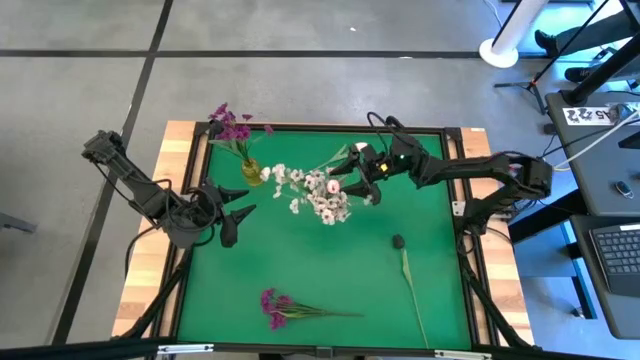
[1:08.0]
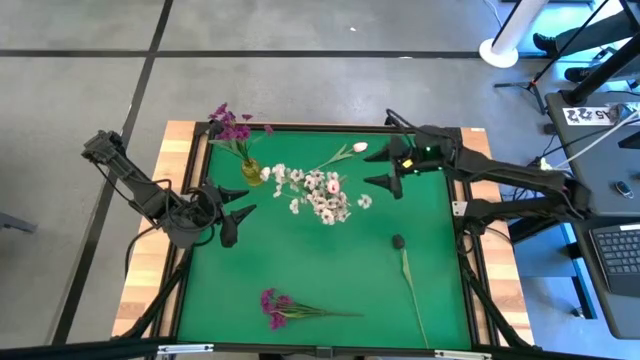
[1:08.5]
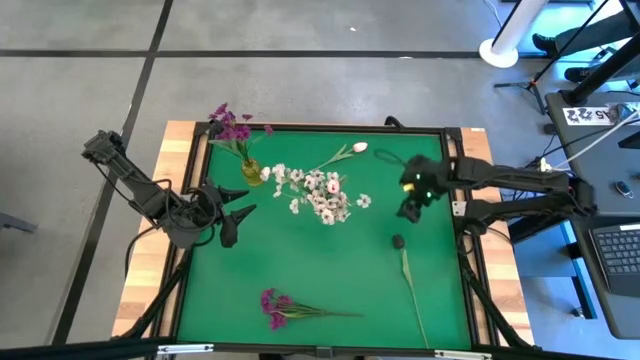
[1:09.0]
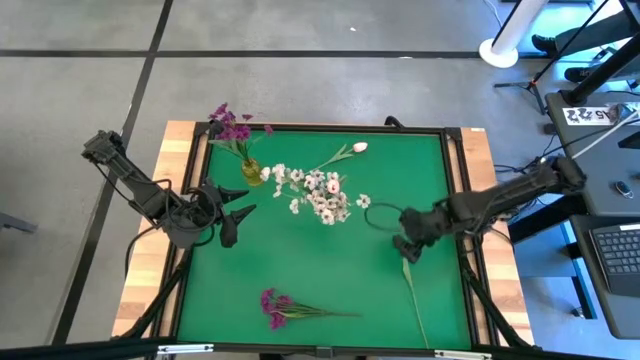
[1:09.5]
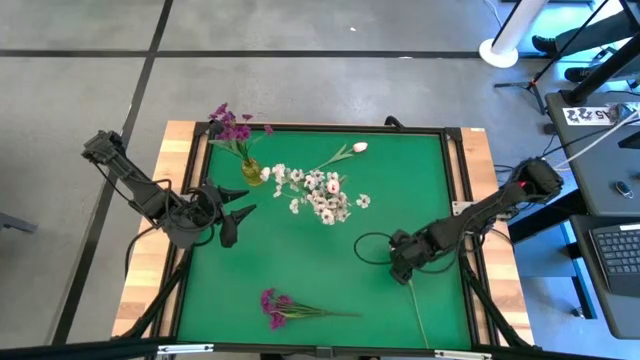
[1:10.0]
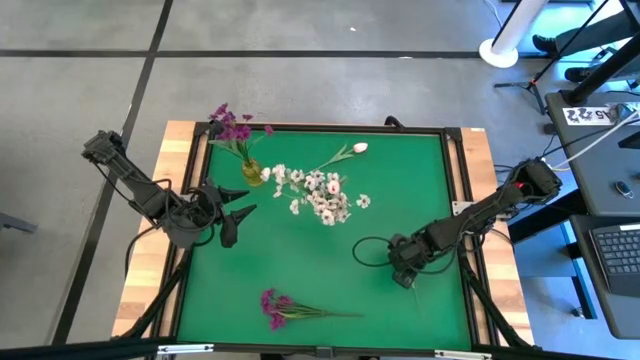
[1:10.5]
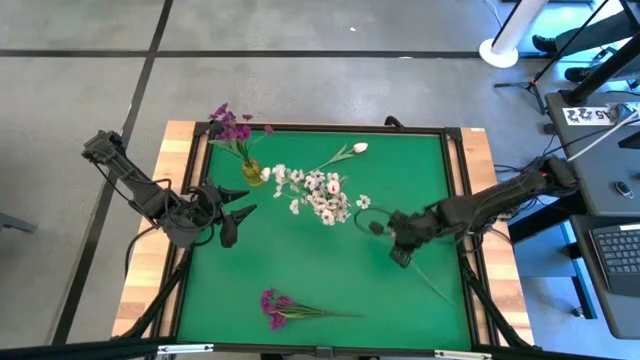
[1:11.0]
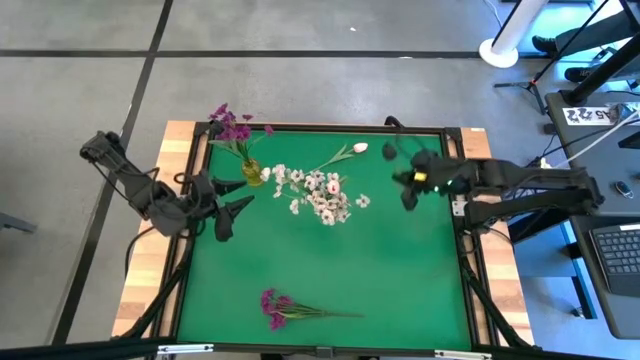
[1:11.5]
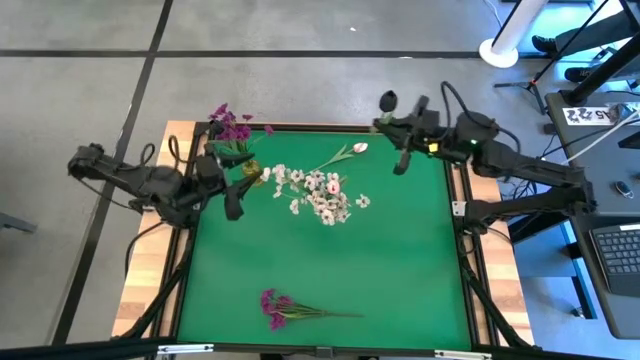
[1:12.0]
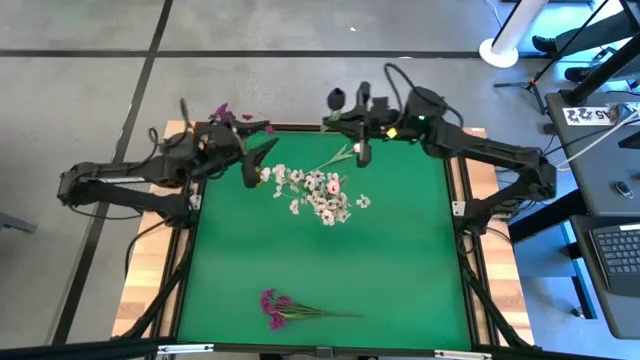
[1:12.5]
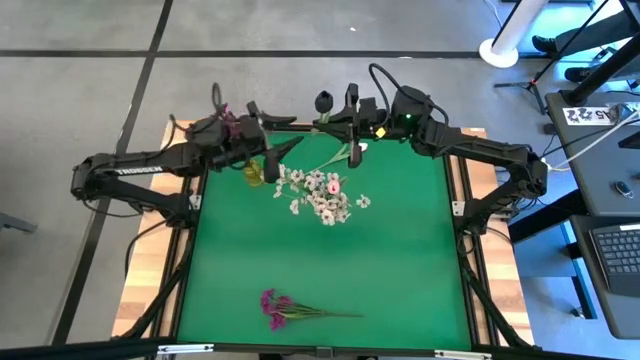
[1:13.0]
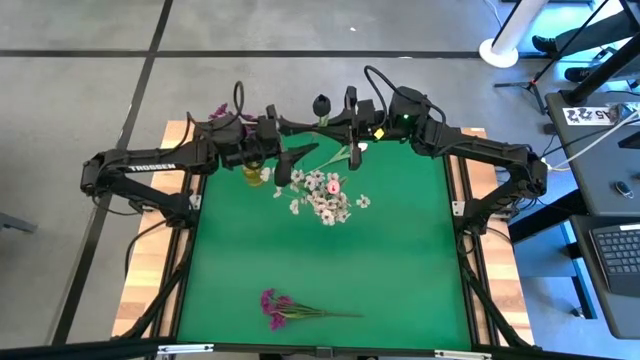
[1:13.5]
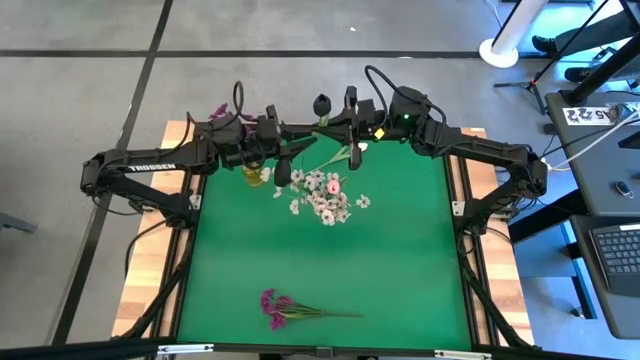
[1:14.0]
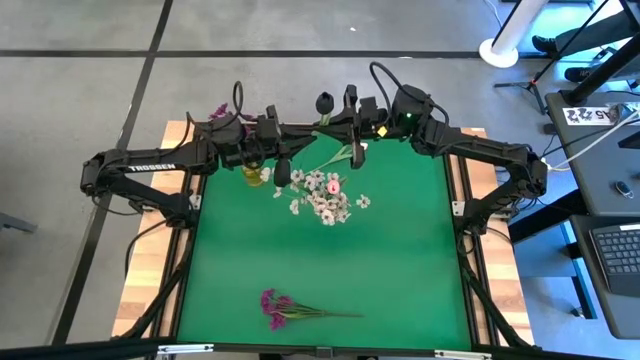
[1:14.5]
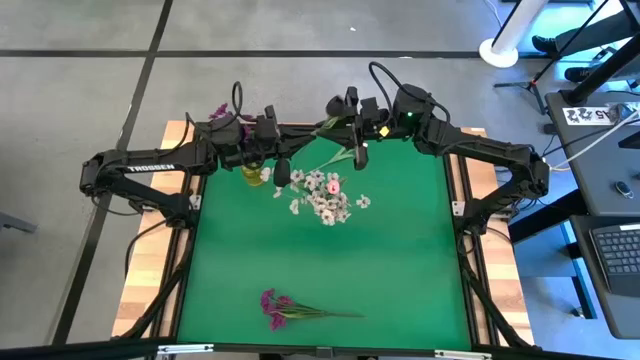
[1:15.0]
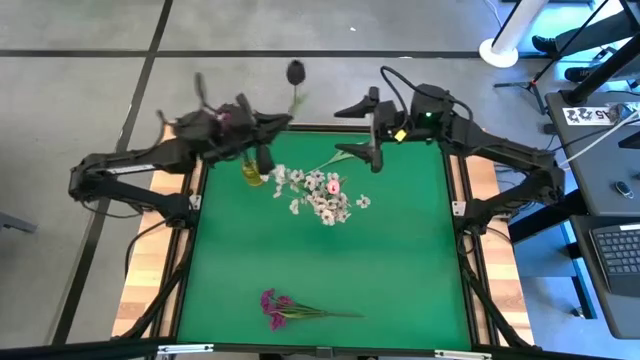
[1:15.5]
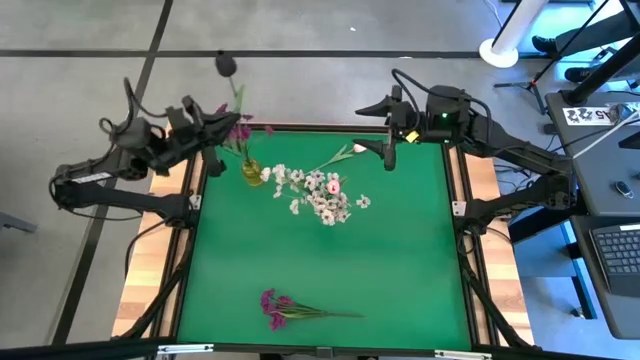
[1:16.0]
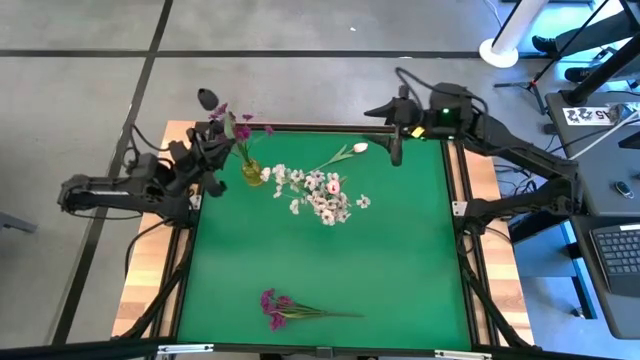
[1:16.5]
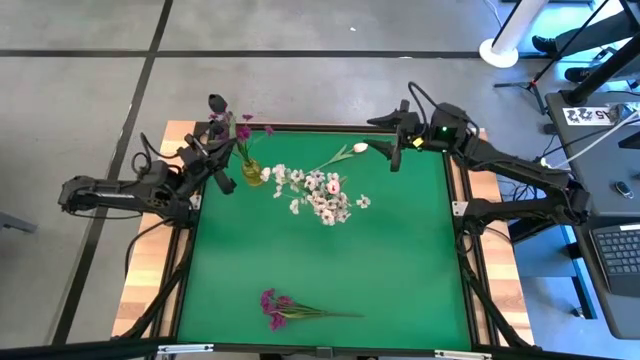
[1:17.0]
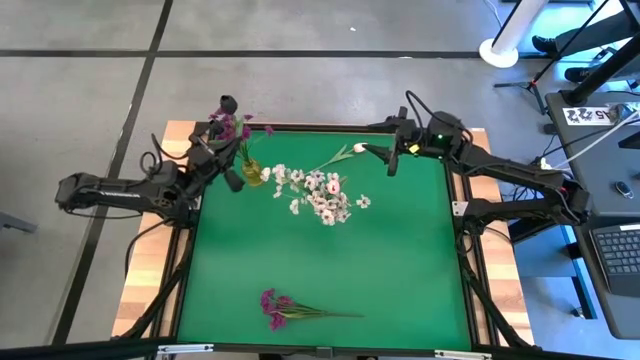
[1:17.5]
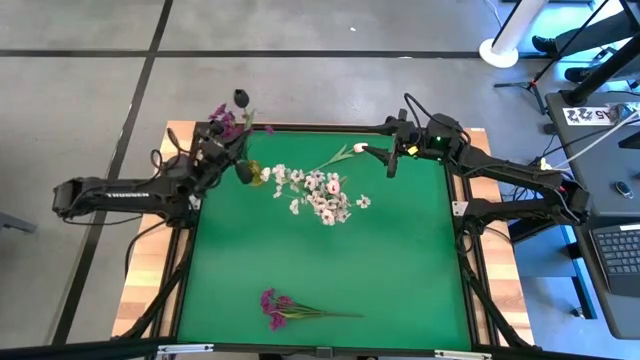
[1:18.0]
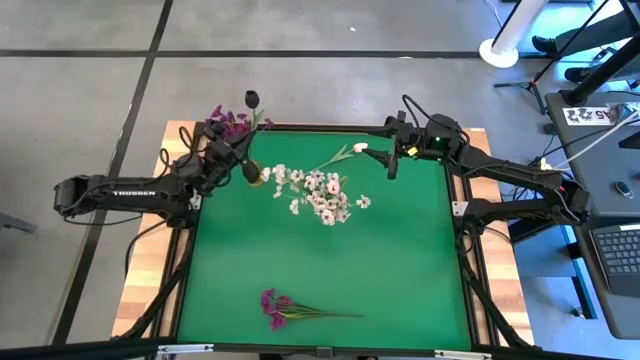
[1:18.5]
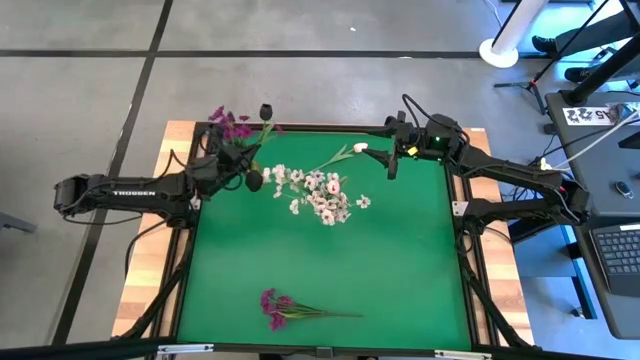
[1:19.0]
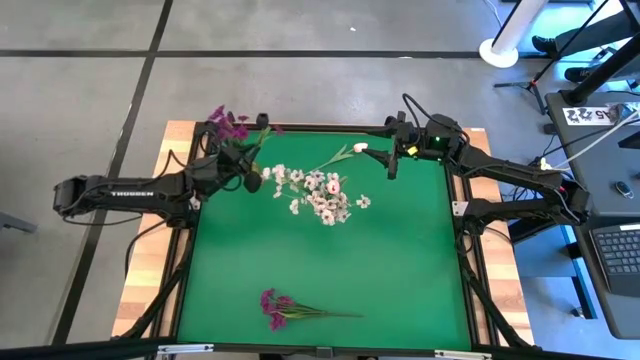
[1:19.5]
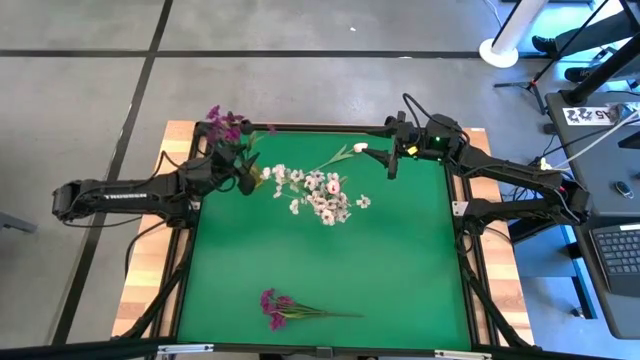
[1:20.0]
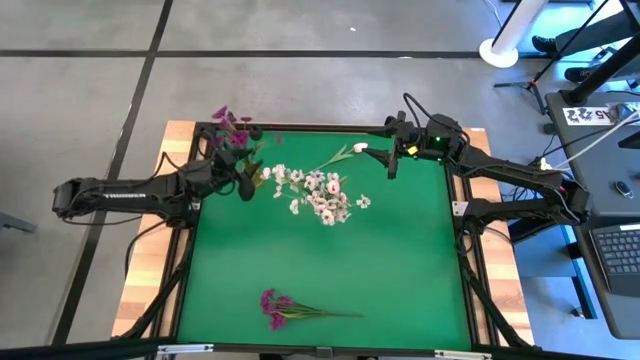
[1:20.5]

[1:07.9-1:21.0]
Task: Sort flowers into vase by color
Put the black flower into the yellow vase

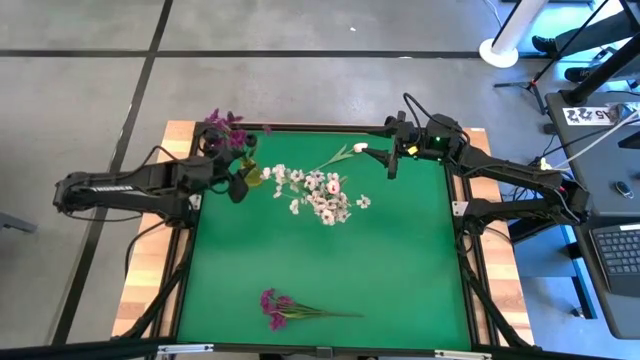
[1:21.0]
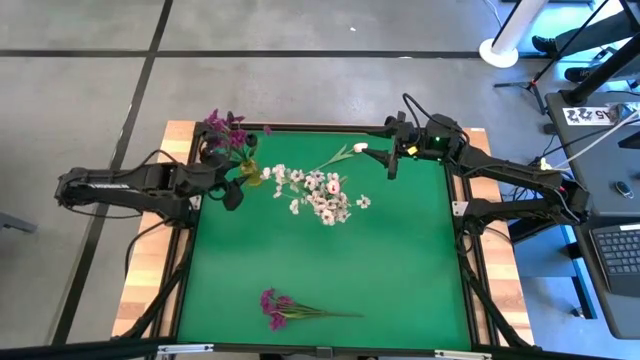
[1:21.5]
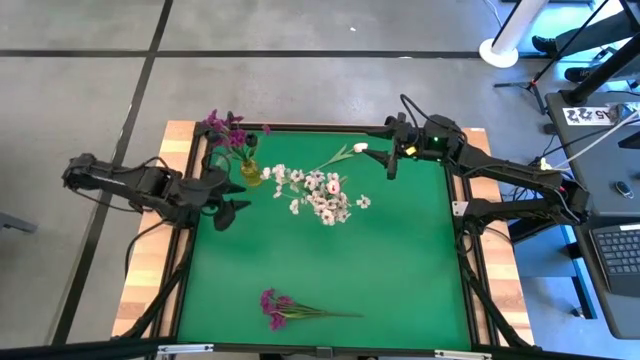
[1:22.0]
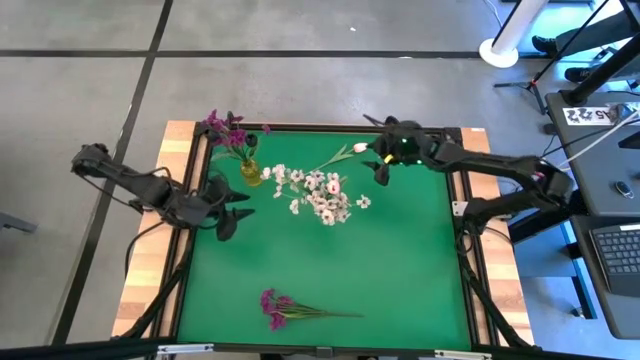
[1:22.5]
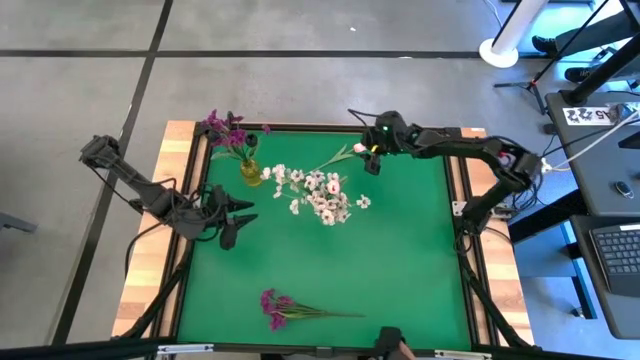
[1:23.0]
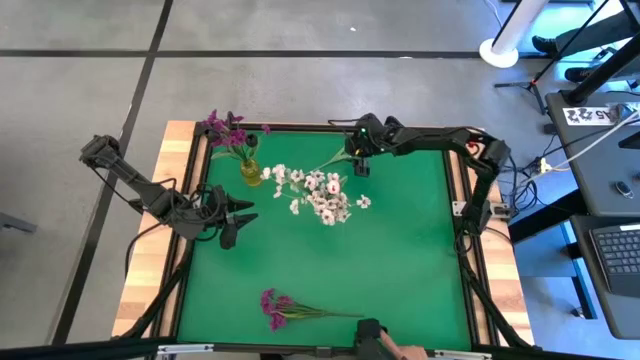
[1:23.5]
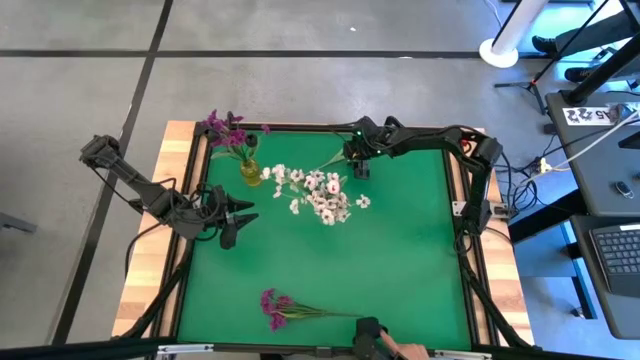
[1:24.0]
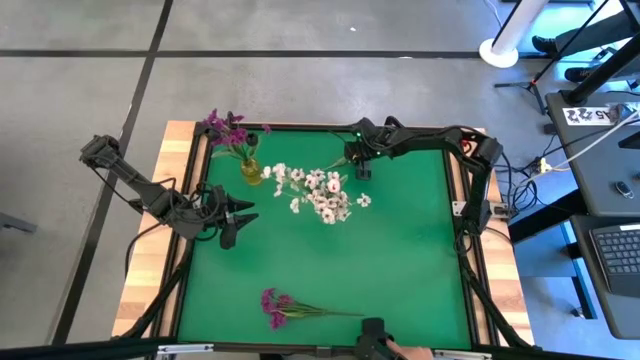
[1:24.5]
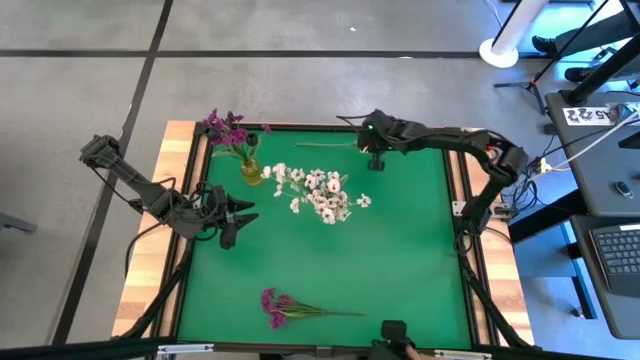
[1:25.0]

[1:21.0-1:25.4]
Put the pink flower into the transparent vase

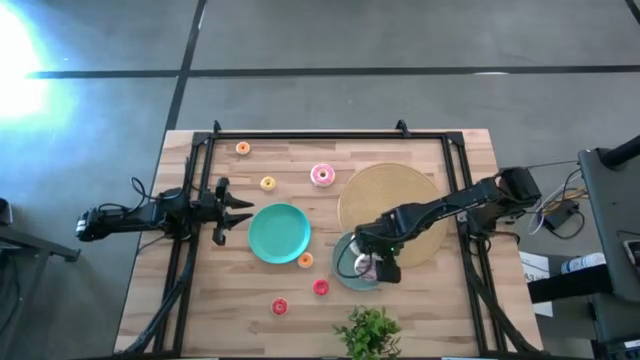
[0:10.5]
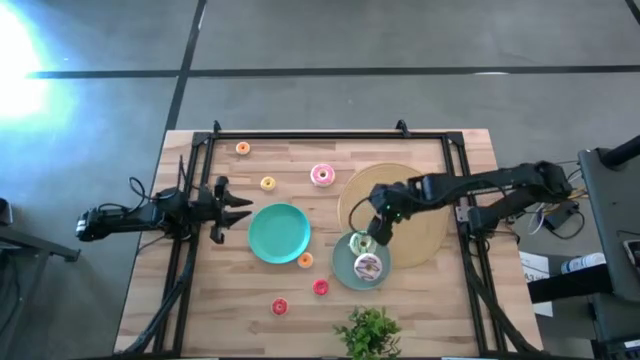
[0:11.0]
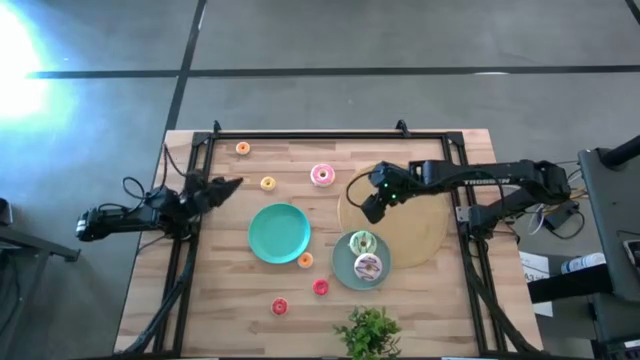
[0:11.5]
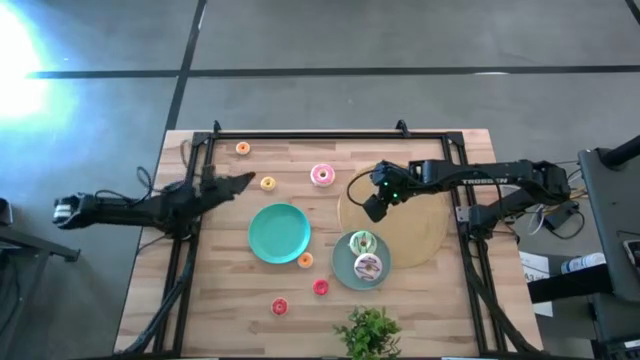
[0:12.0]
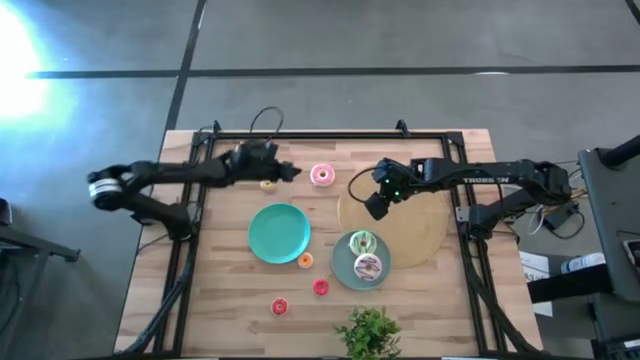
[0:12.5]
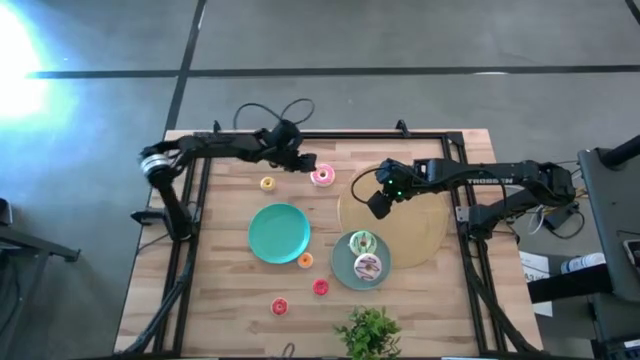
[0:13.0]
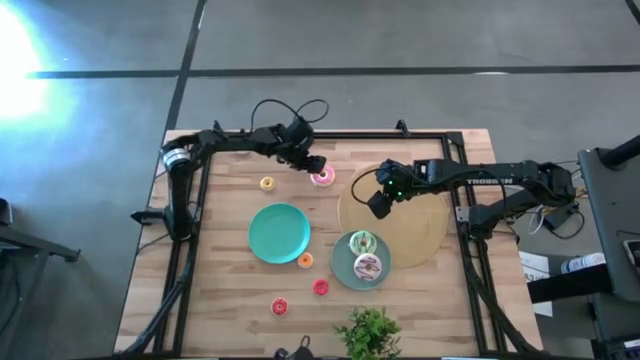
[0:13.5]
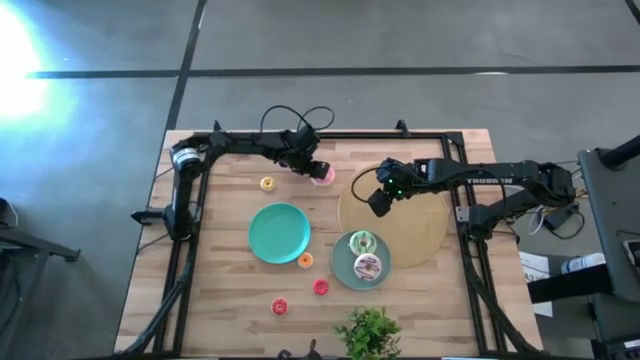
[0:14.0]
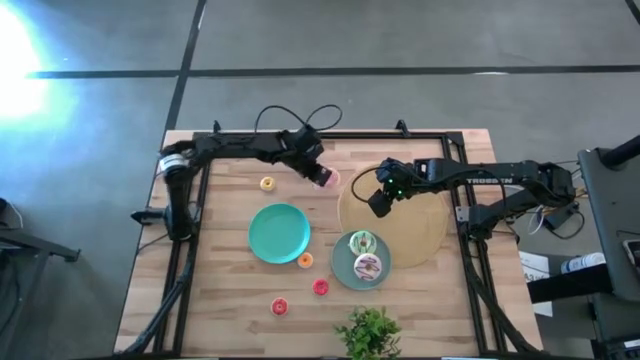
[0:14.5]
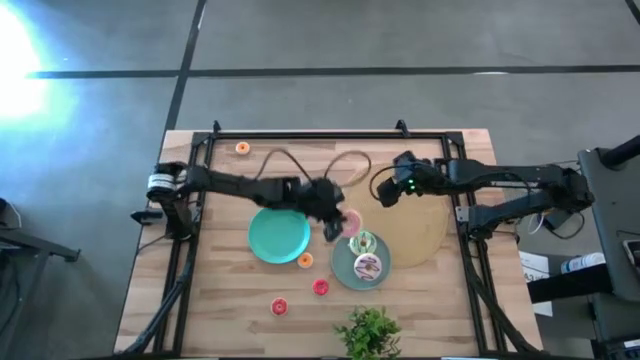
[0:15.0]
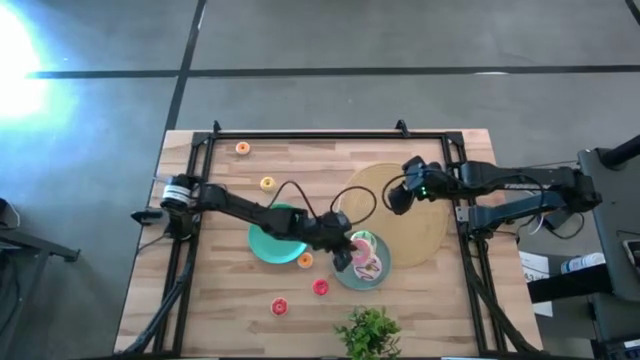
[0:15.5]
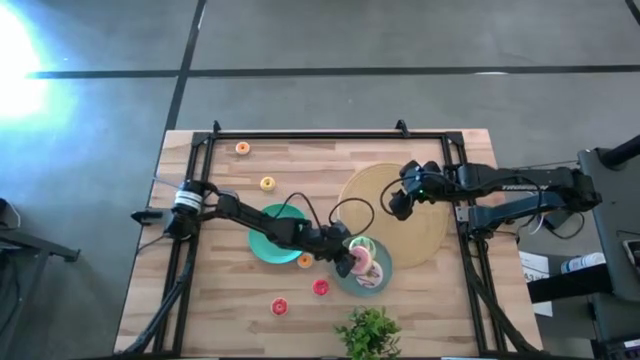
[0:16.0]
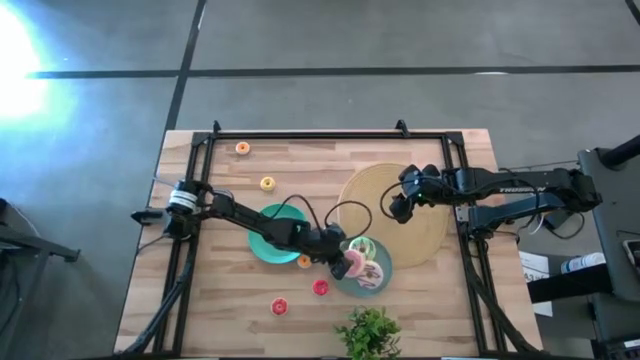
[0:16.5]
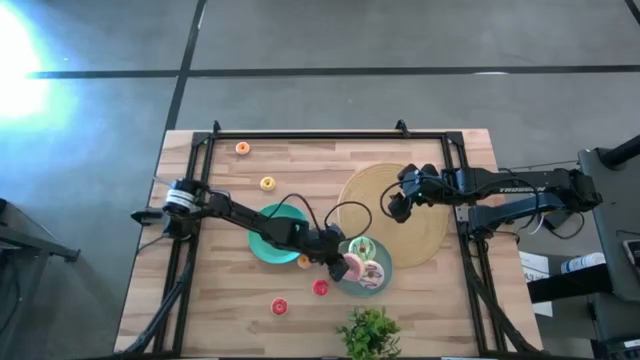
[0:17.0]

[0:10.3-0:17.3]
Task: Pick & Place donuts
Put the large pink donut on the blue plate
